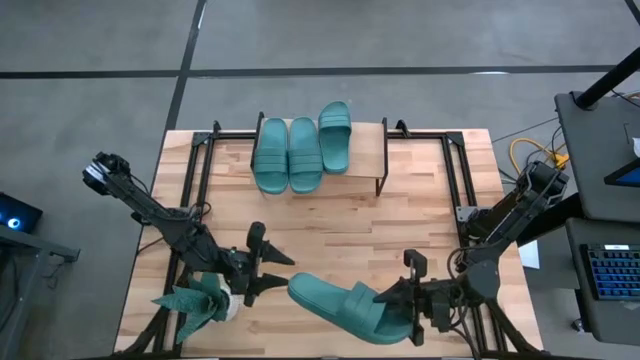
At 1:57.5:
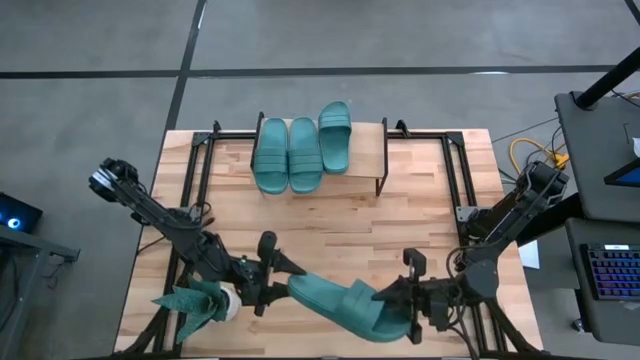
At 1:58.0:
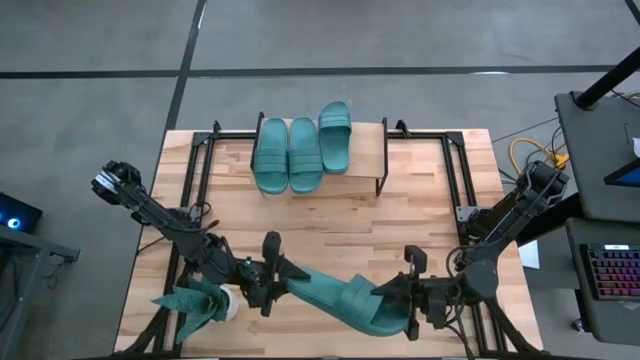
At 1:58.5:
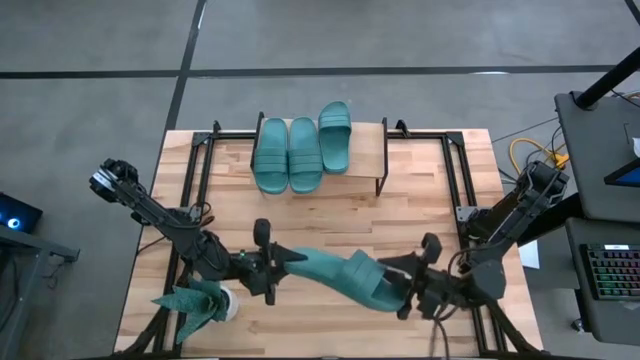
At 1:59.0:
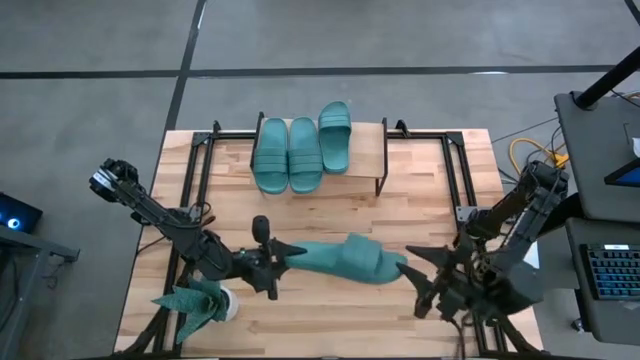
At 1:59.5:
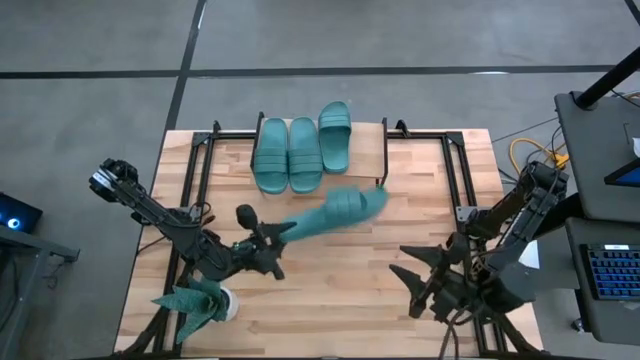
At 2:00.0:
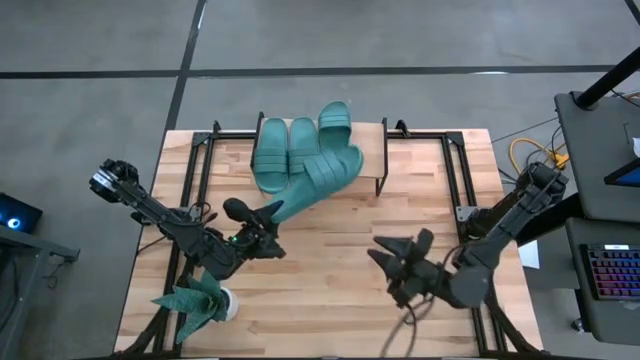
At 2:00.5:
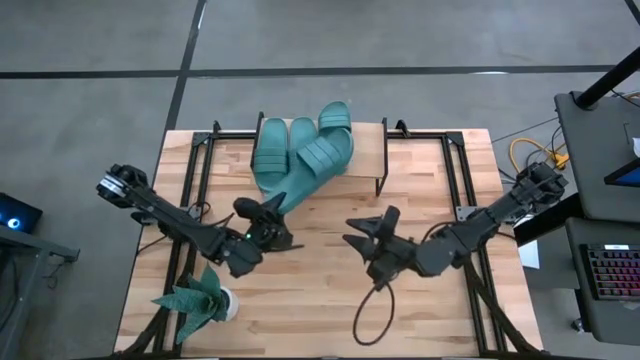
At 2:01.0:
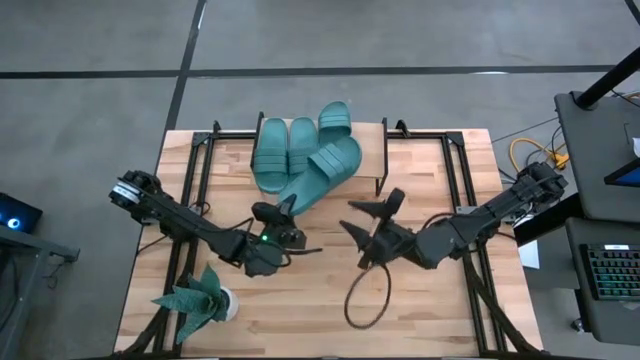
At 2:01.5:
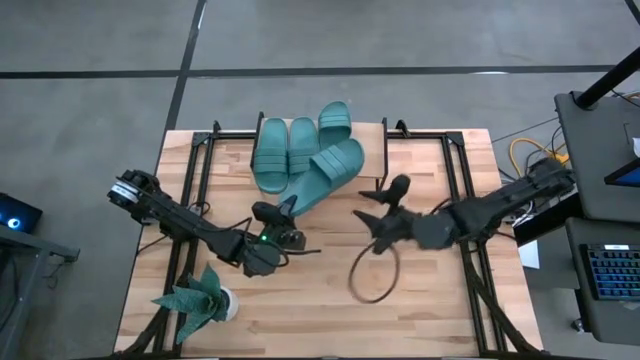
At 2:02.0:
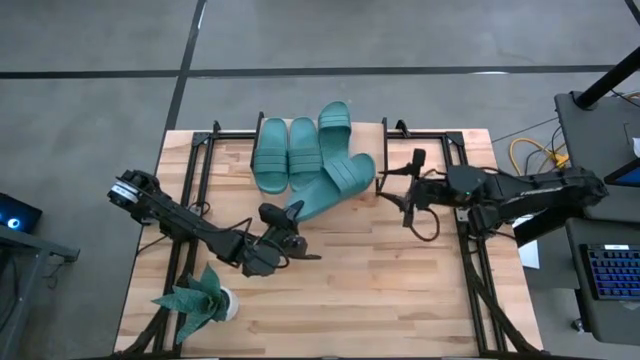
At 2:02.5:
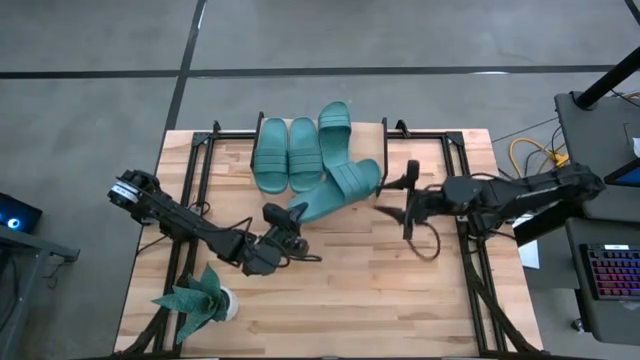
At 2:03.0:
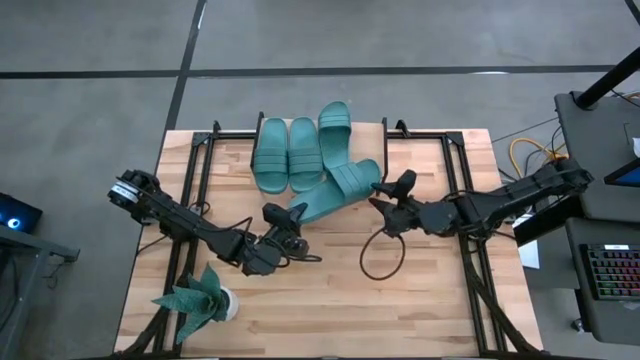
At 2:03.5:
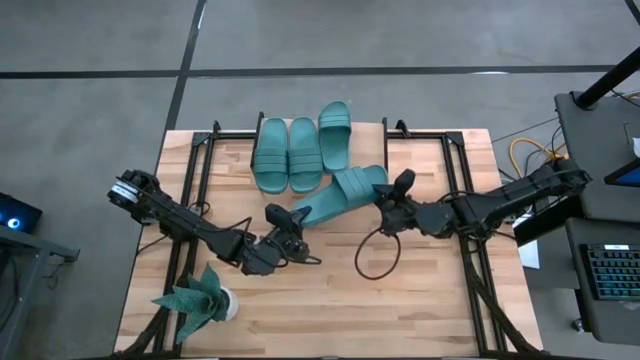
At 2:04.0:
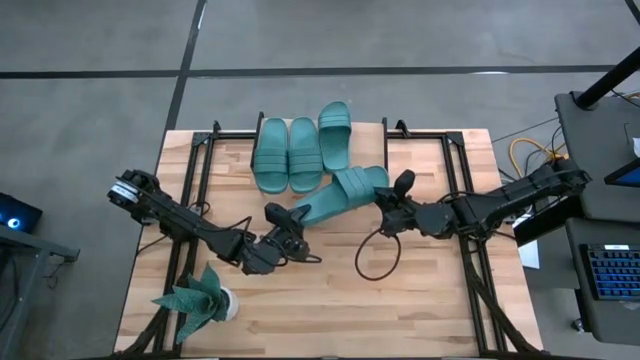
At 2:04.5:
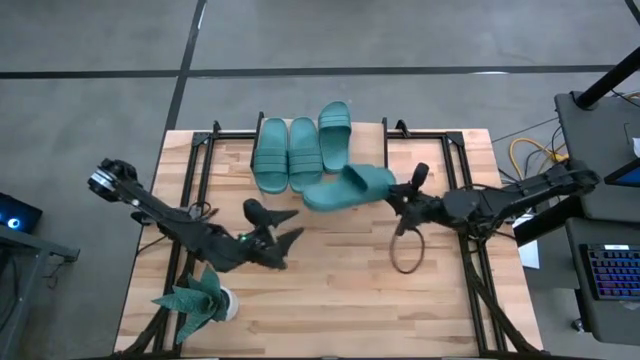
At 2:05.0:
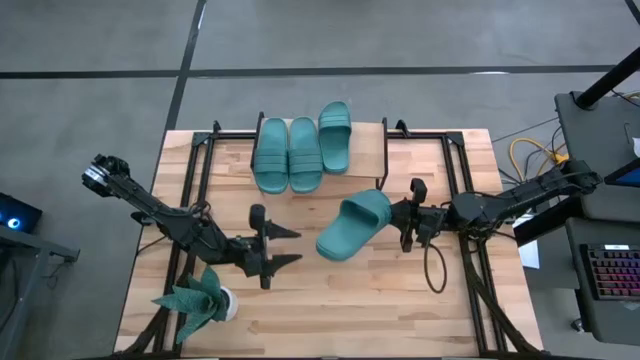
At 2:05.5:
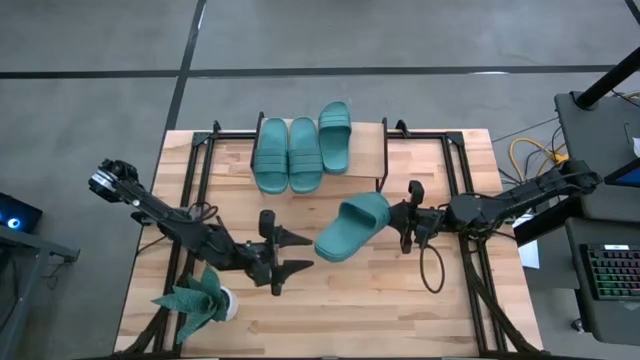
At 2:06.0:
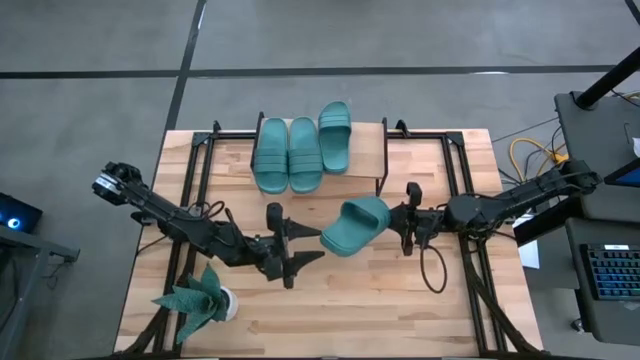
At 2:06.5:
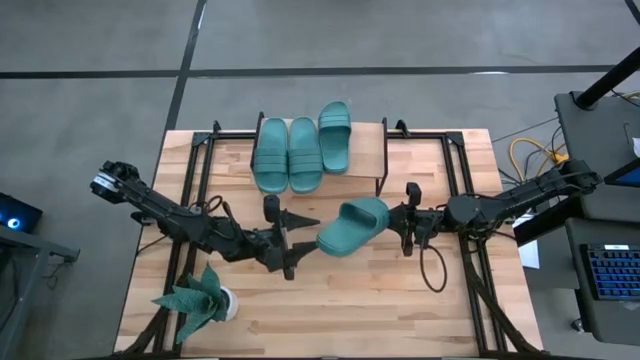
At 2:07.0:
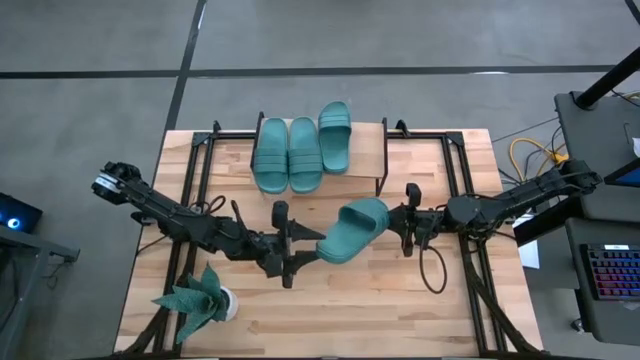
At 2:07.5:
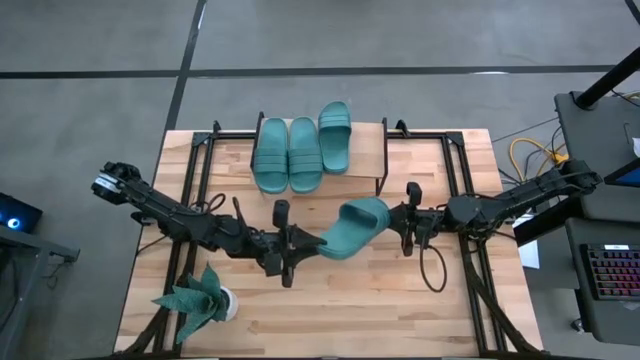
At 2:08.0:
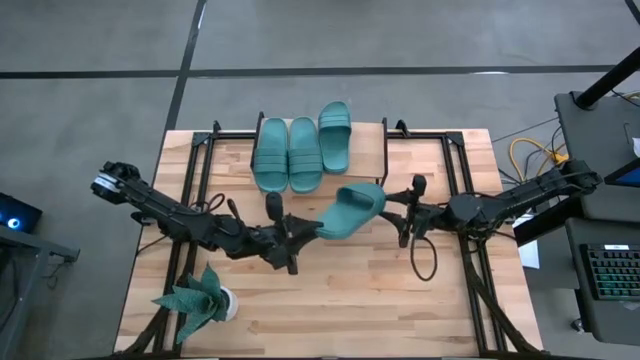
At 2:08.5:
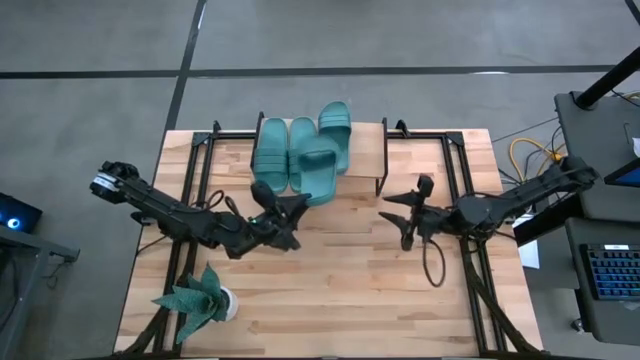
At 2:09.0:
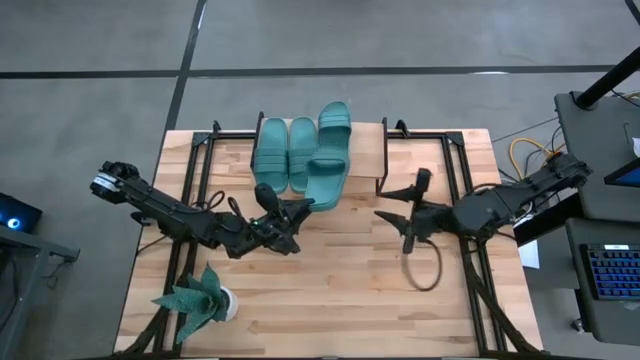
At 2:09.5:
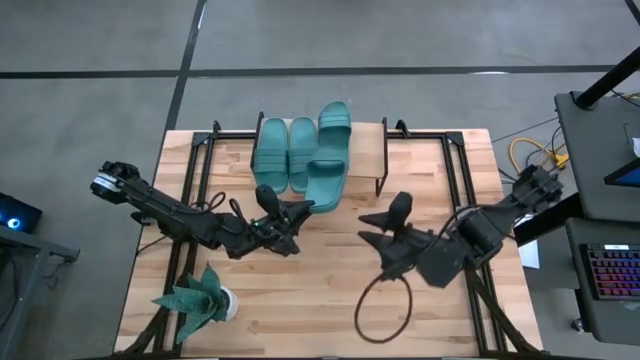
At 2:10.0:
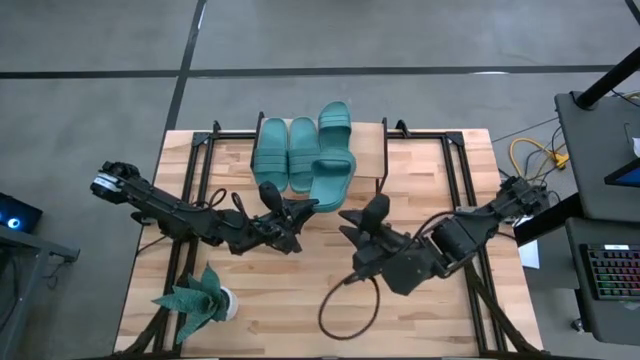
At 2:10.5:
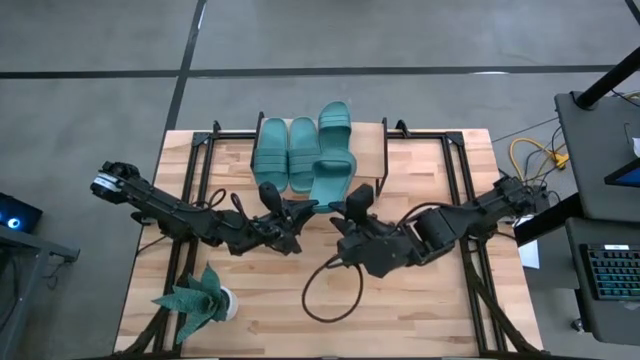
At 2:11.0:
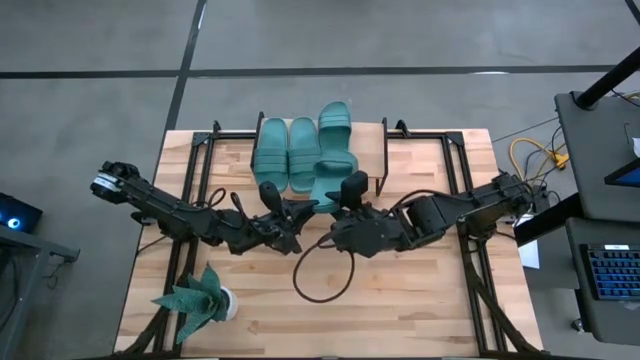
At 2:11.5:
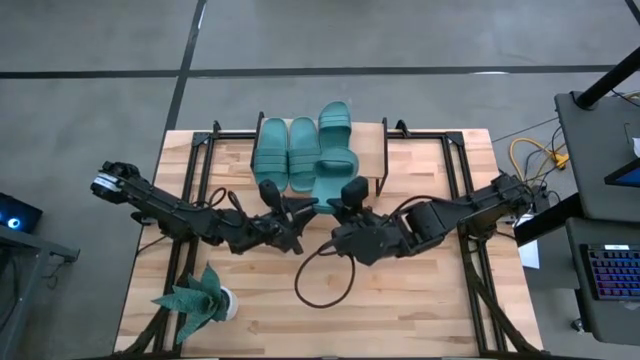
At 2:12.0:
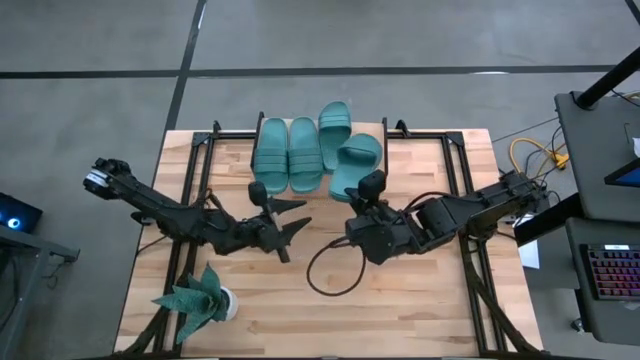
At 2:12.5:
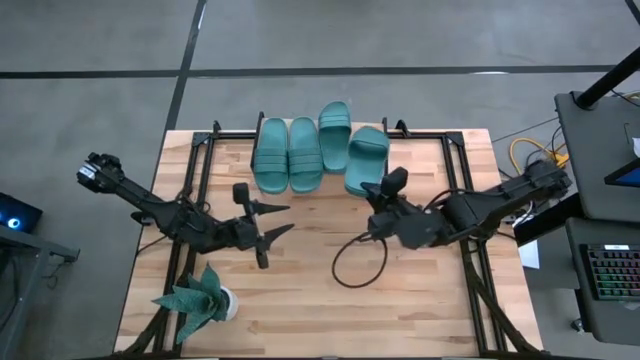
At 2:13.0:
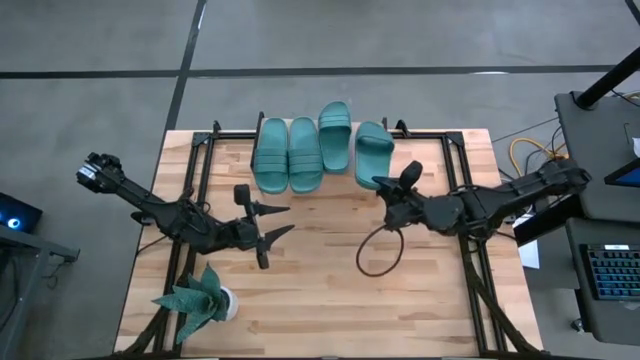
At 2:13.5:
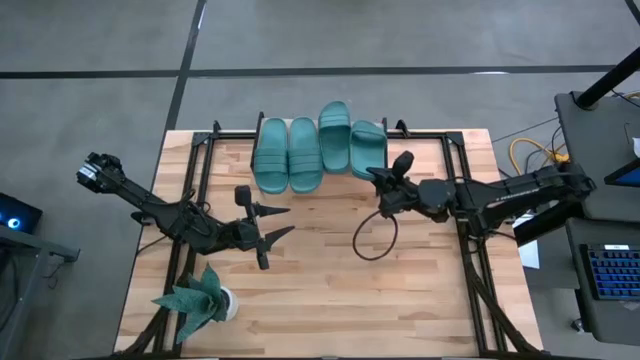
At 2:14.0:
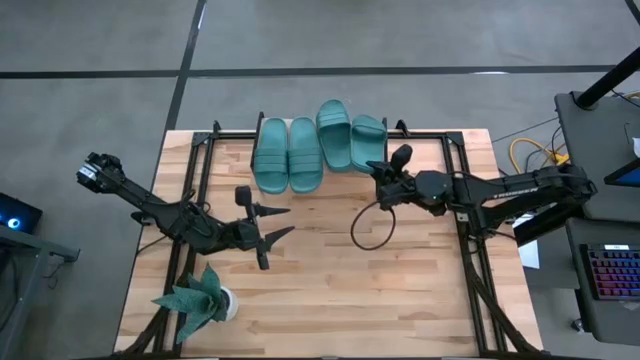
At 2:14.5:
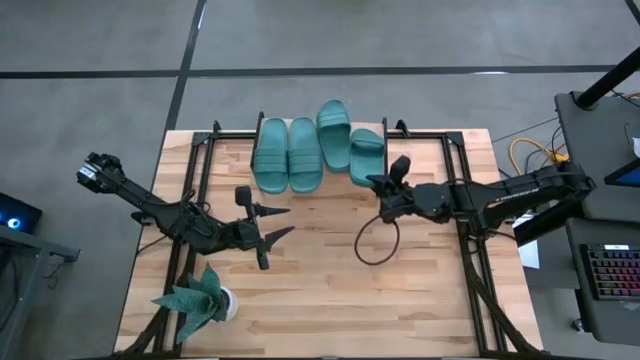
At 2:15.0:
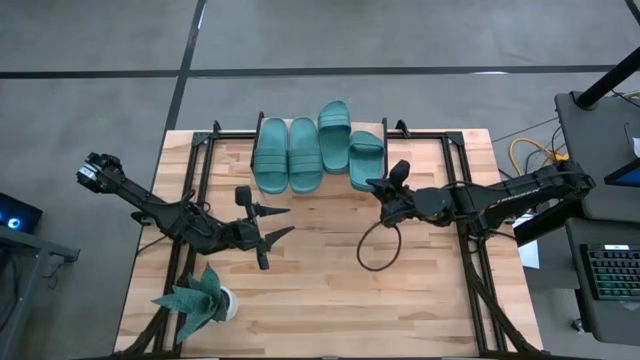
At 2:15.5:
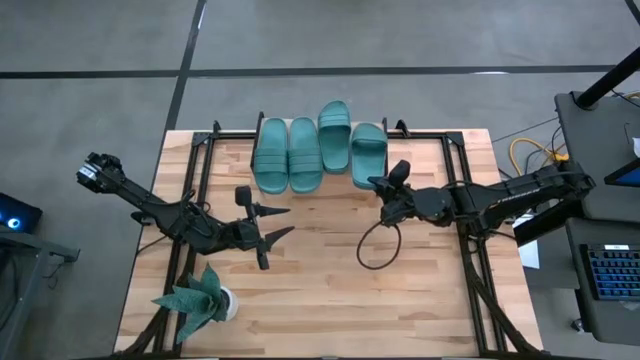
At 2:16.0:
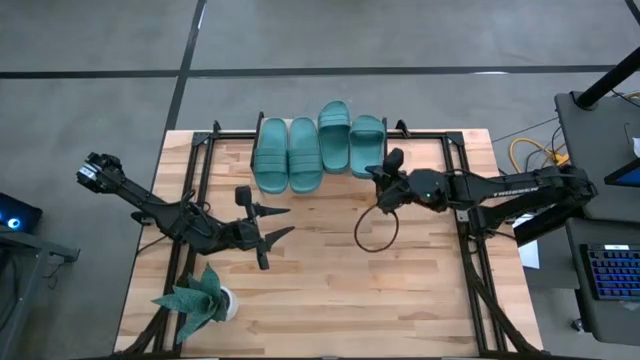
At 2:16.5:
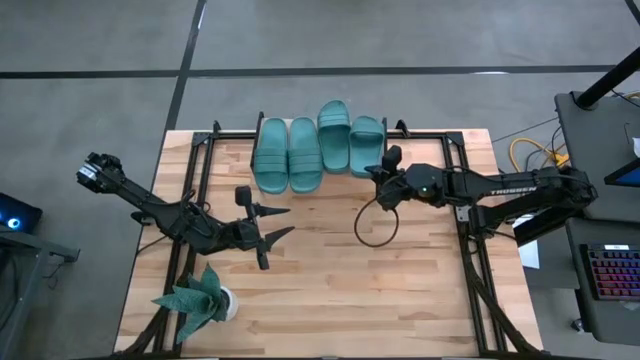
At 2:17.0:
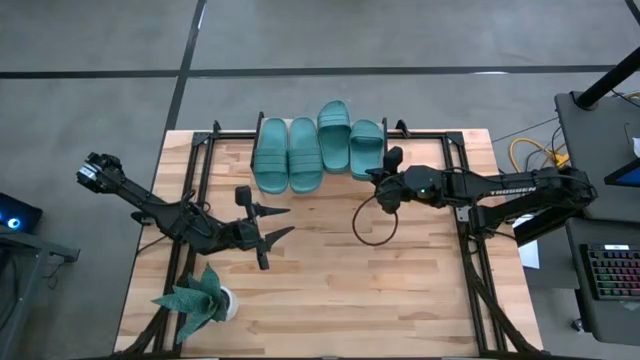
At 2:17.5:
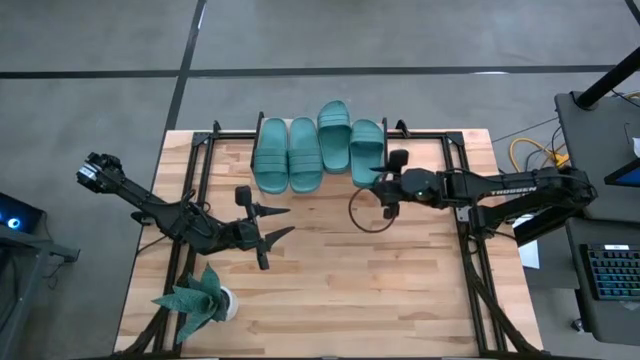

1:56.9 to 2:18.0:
Task: Pick and place slides into the shelf
Put the blue slipper on the shelf
